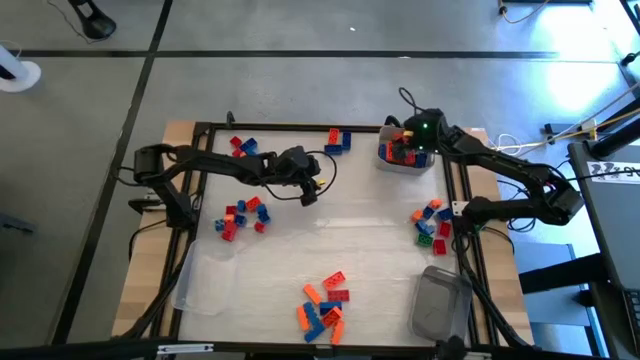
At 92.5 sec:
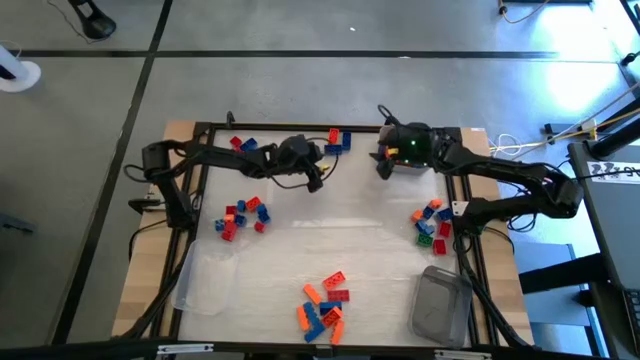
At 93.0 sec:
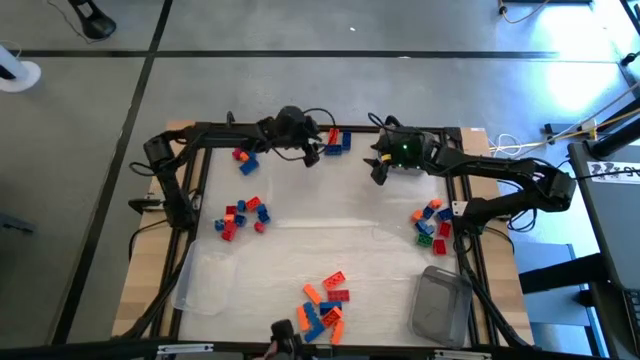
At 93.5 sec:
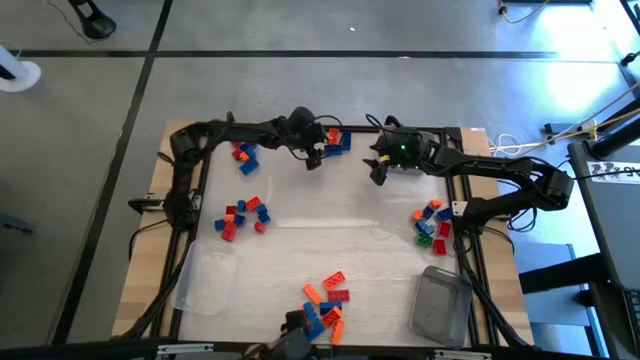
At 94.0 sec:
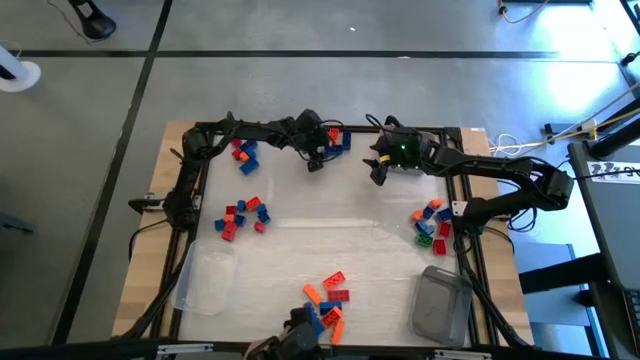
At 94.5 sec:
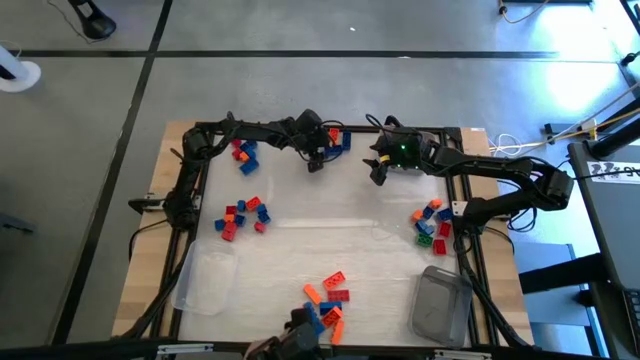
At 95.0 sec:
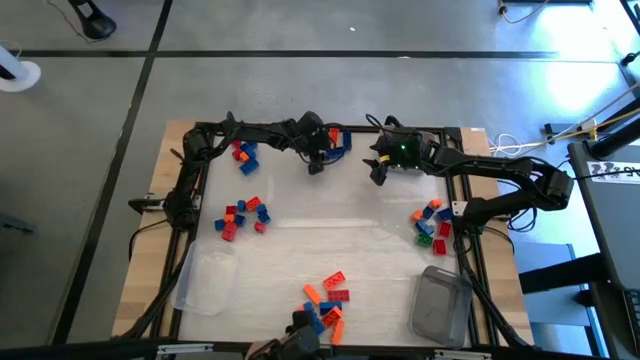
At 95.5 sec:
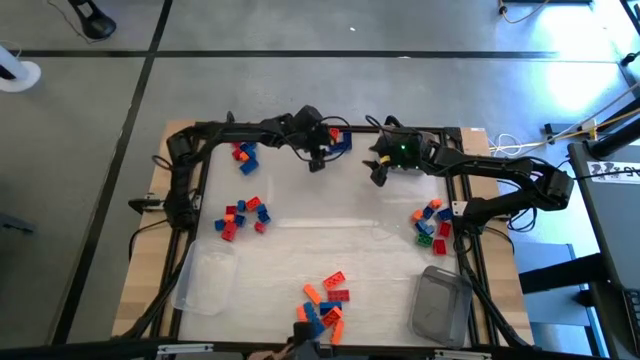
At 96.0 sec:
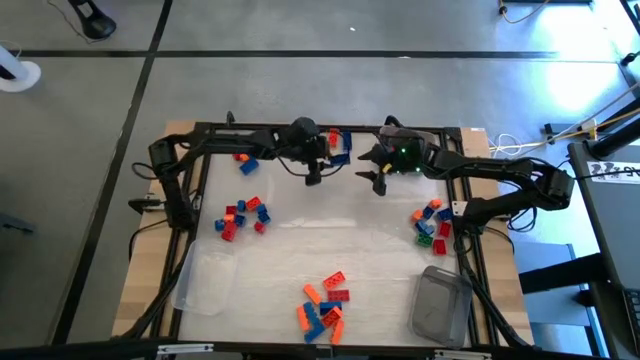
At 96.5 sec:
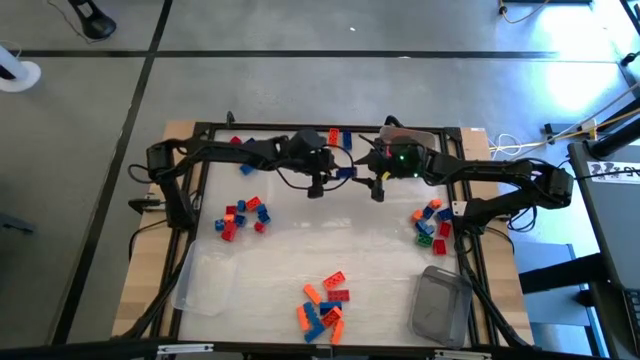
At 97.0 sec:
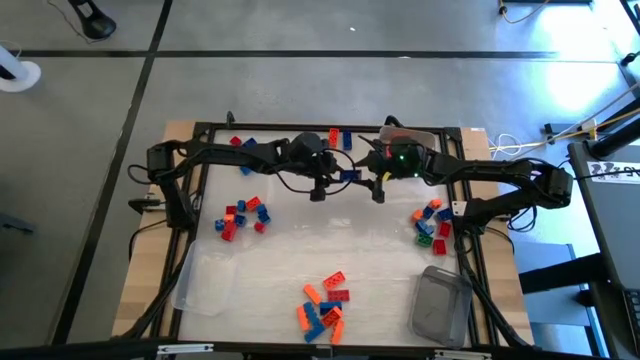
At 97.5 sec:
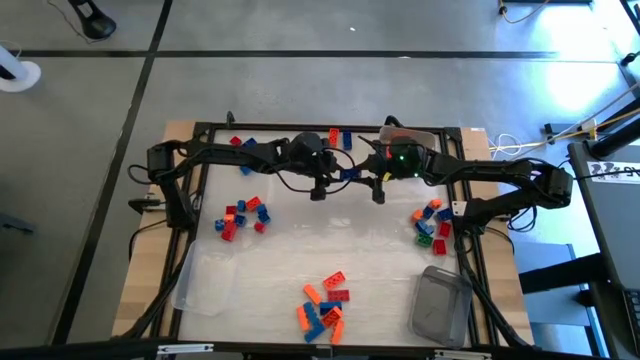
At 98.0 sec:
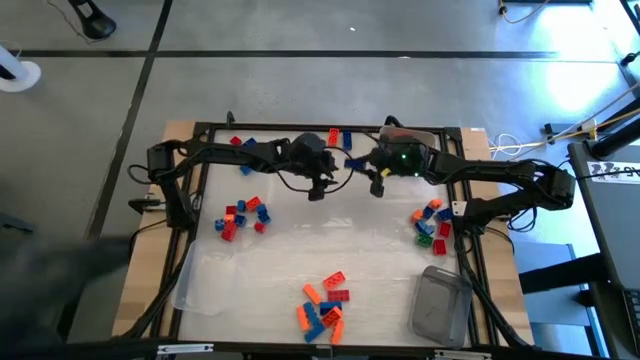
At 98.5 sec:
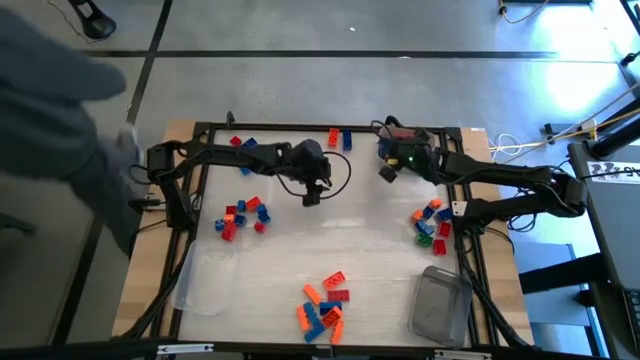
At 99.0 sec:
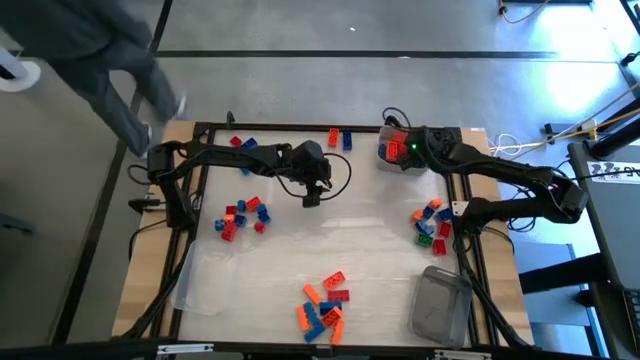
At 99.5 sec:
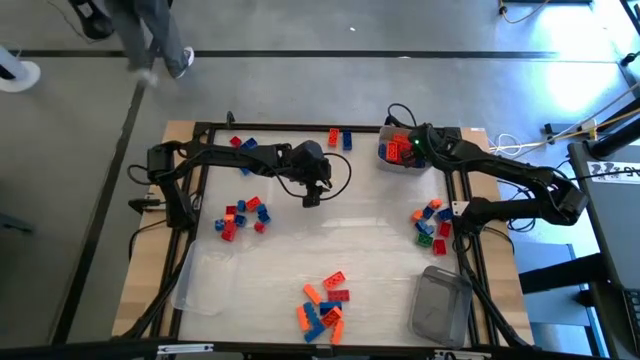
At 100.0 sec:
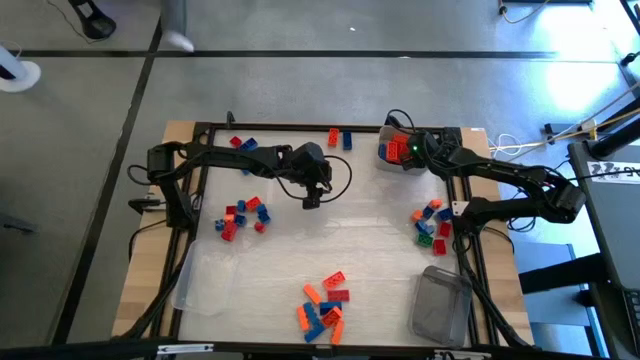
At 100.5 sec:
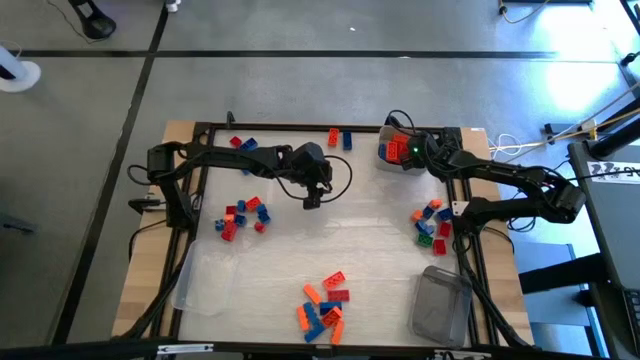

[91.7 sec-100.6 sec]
Task: Sort blocks by size
Put the blue game piece into the gray bin

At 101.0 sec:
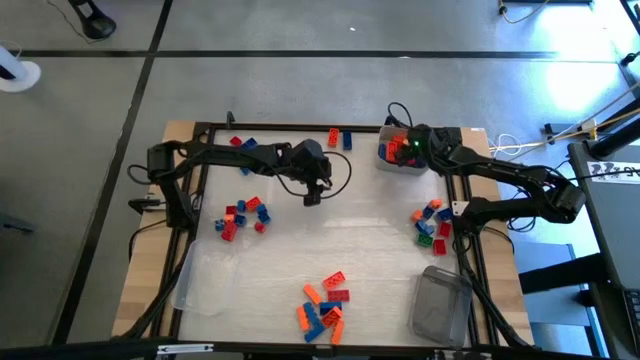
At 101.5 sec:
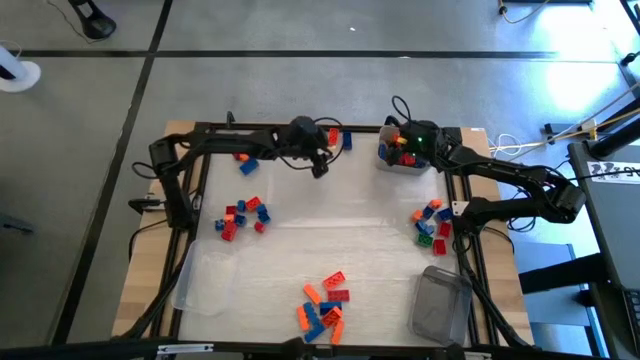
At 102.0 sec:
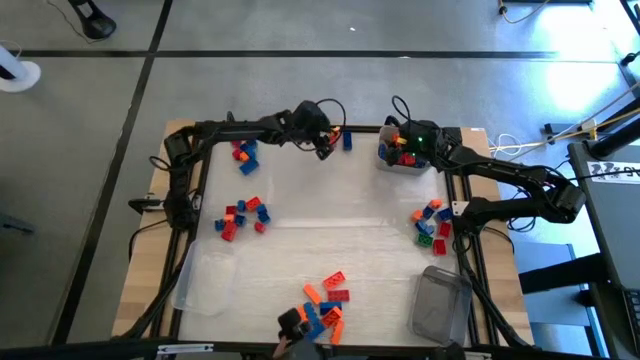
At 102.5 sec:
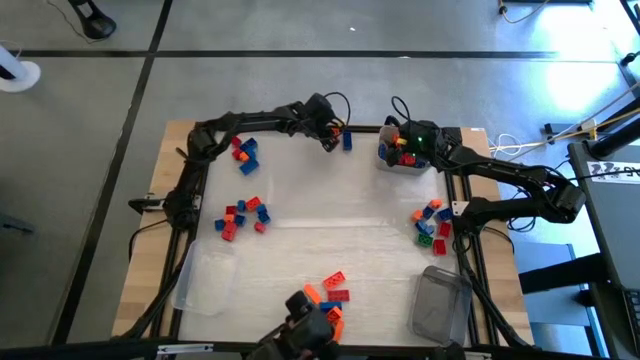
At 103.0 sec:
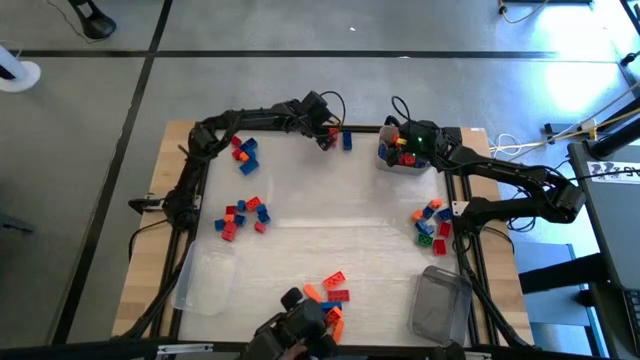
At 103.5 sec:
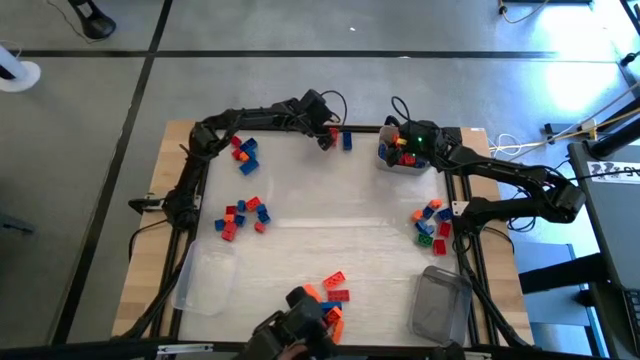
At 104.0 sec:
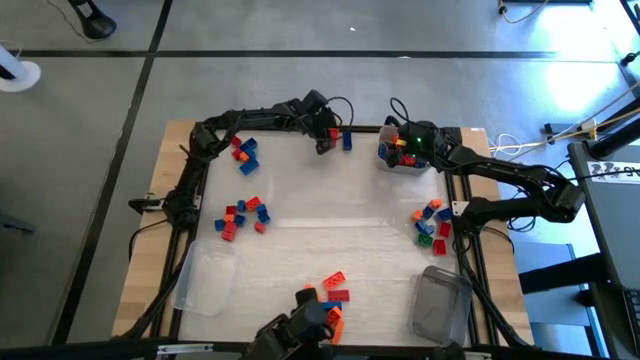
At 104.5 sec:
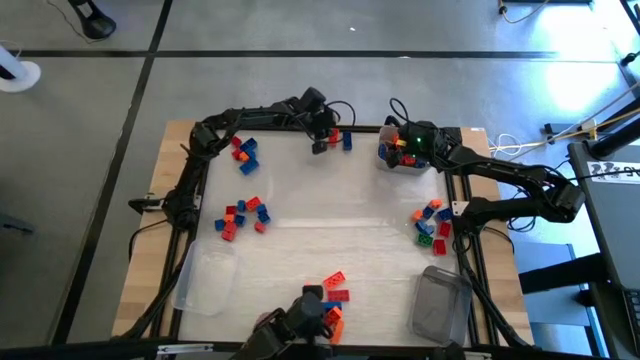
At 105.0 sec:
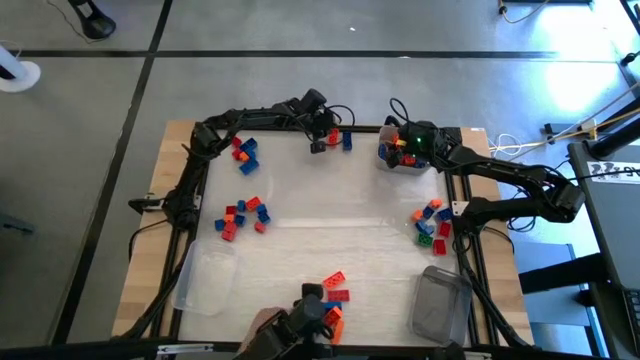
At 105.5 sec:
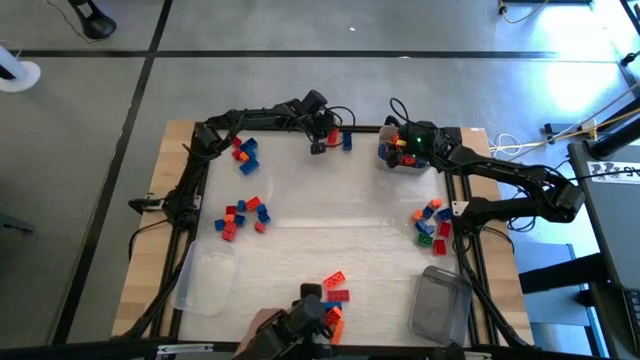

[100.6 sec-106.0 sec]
Put the orange game piece into the gray bin

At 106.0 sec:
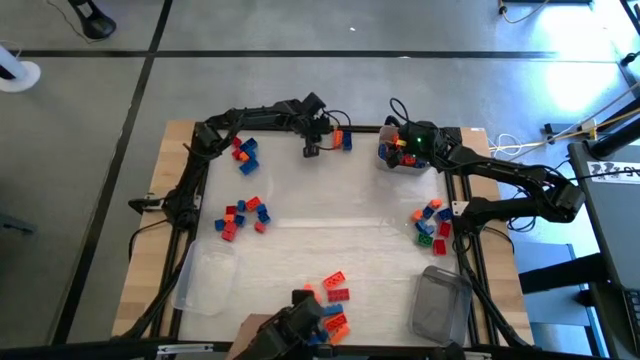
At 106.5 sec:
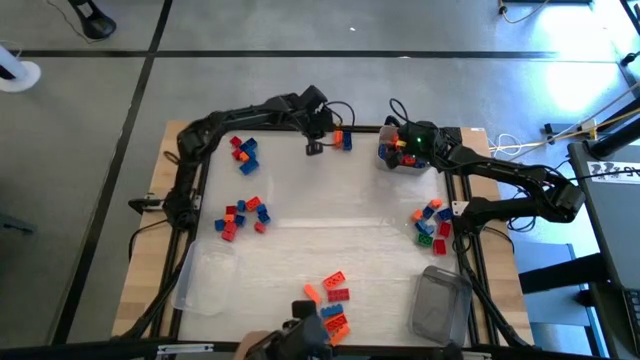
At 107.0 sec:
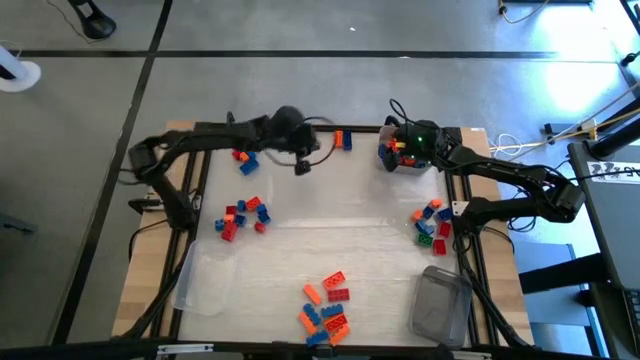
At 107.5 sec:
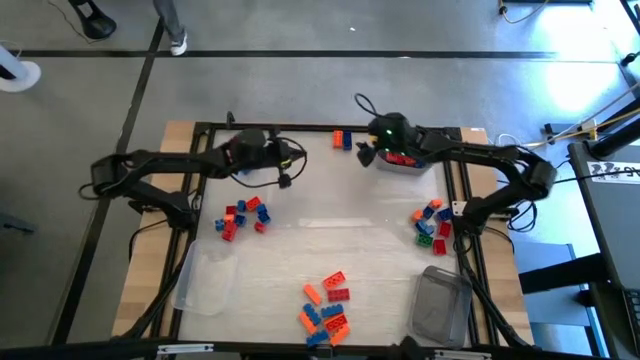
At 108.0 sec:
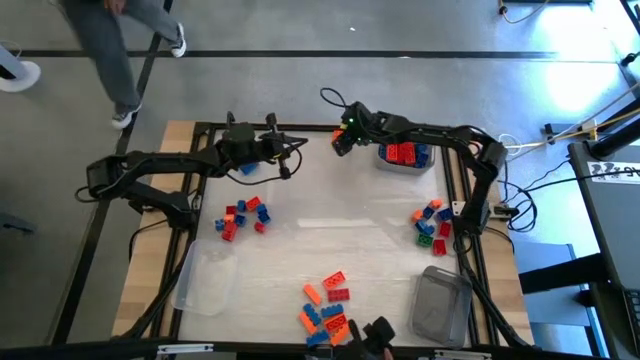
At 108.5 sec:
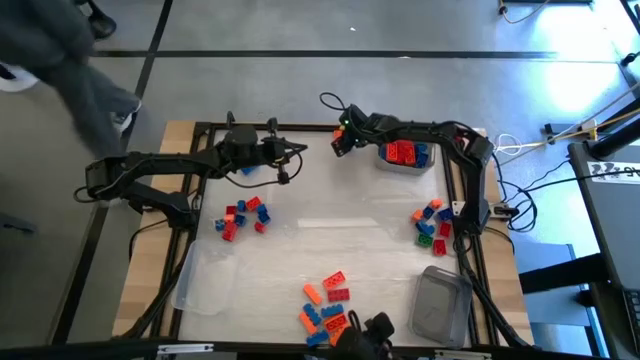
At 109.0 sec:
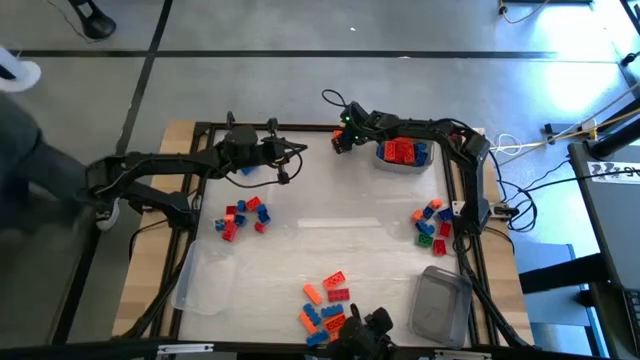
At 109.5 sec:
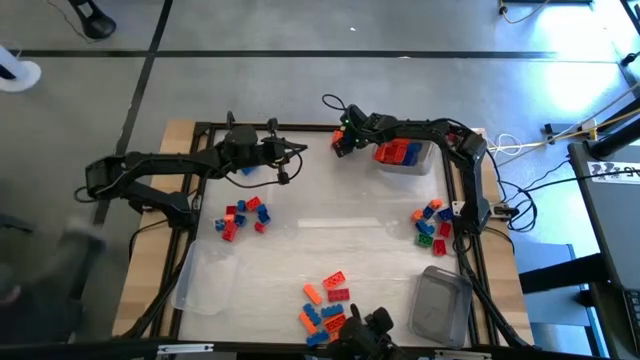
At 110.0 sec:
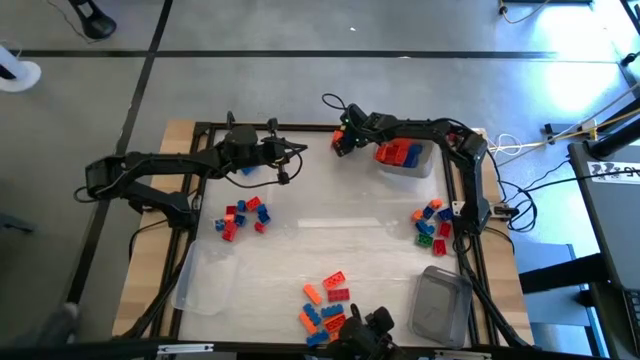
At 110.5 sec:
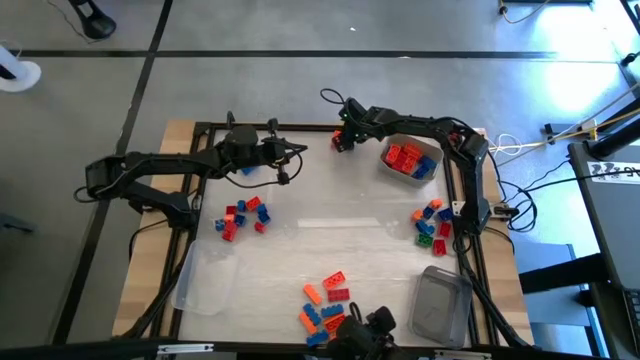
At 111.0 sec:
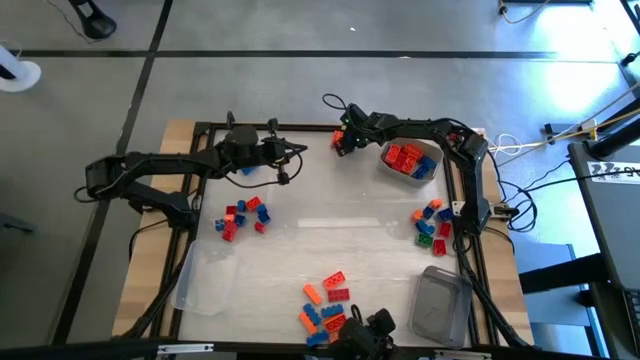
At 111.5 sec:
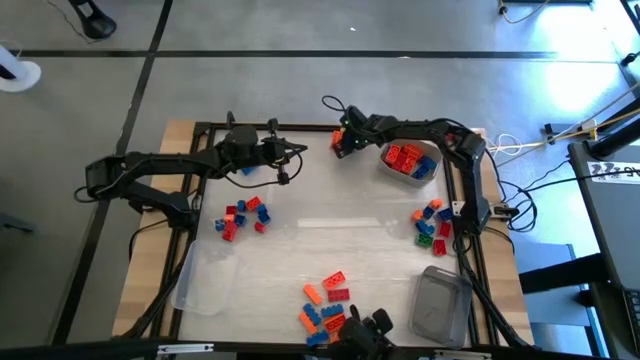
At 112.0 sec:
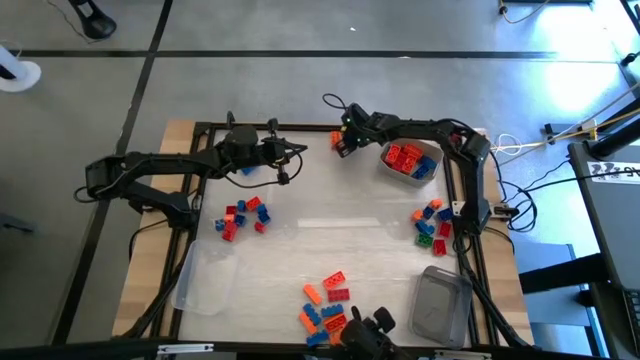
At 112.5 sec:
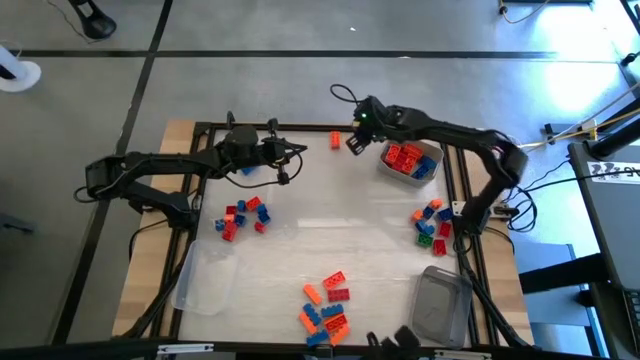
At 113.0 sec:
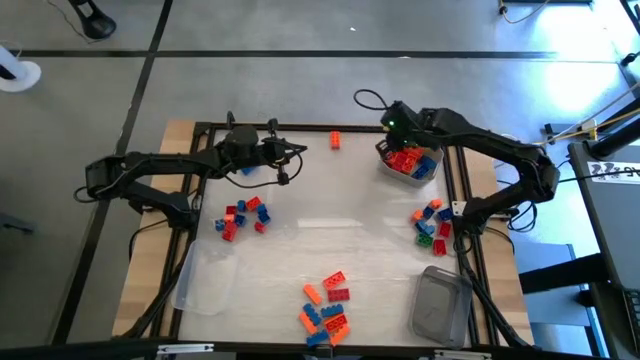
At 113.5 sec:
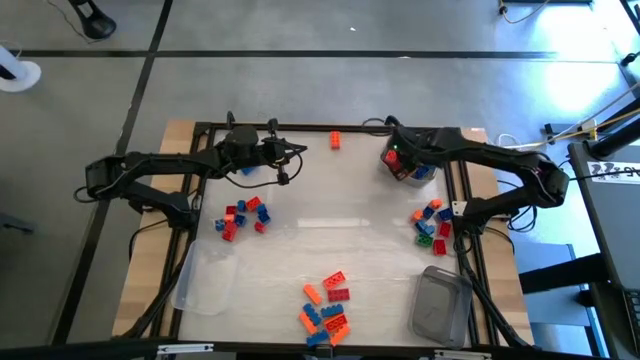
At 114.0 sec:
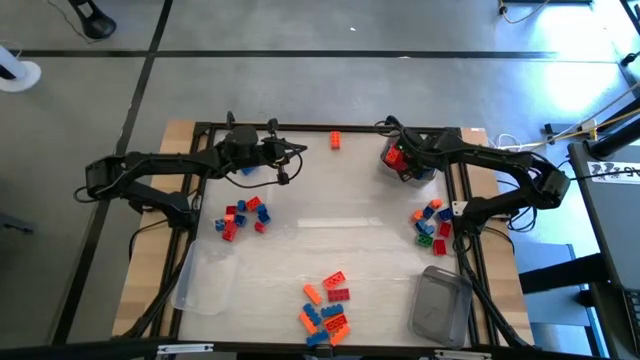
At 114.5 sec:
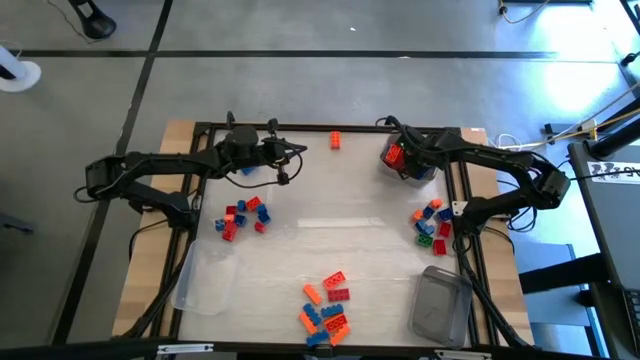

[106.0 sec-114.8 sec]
Put the blue game piece into the gray bin
